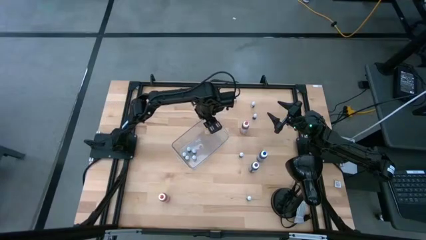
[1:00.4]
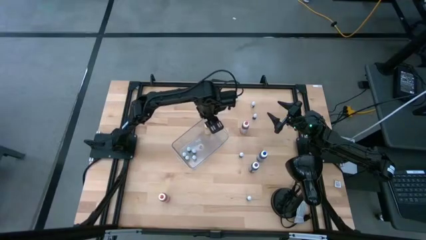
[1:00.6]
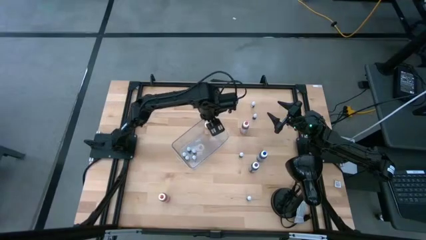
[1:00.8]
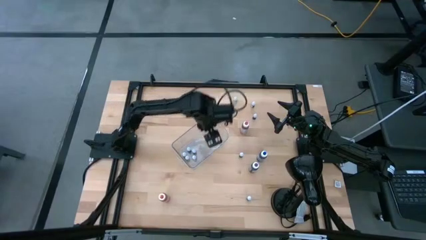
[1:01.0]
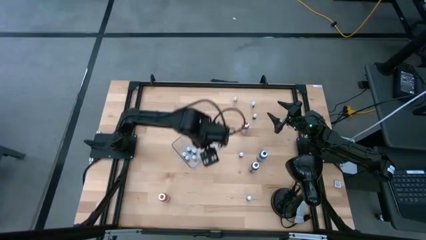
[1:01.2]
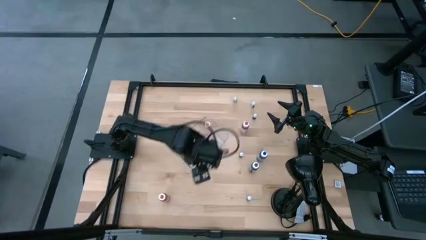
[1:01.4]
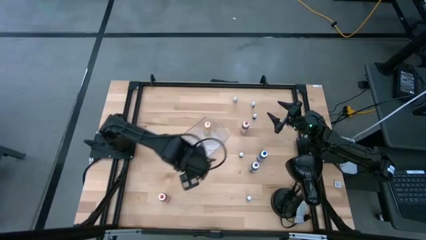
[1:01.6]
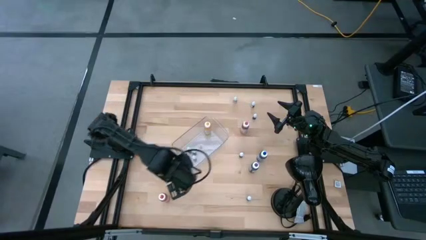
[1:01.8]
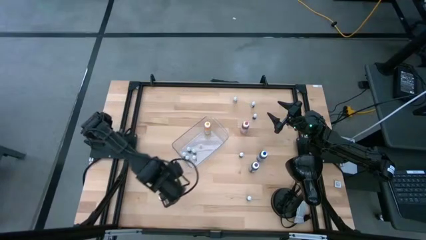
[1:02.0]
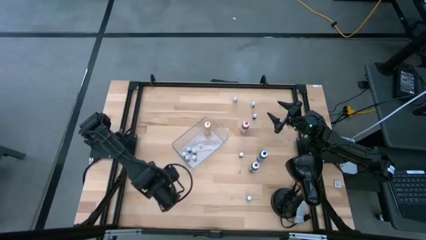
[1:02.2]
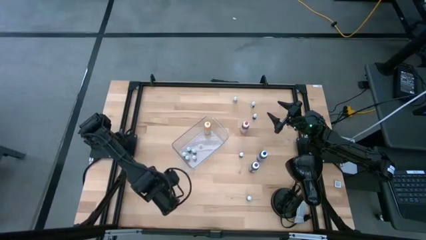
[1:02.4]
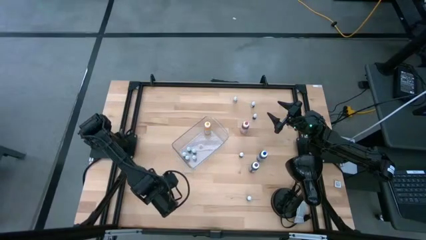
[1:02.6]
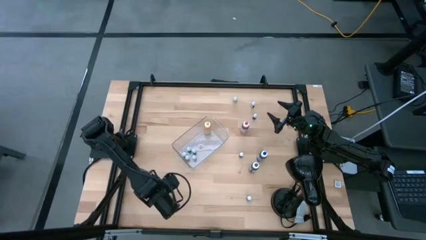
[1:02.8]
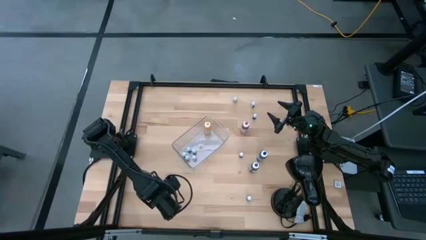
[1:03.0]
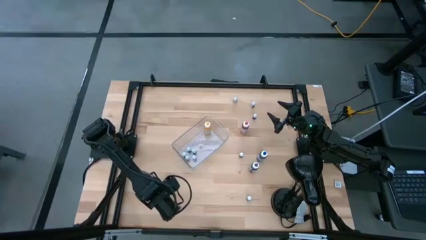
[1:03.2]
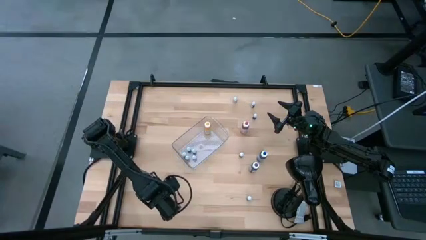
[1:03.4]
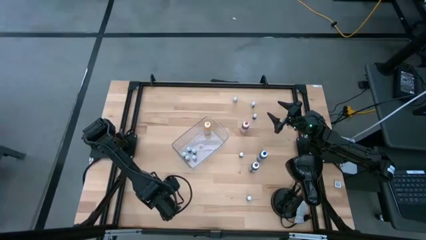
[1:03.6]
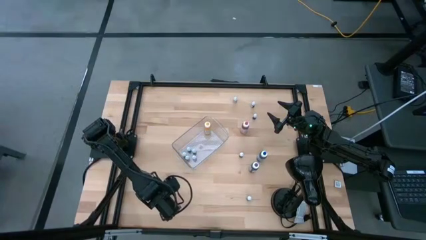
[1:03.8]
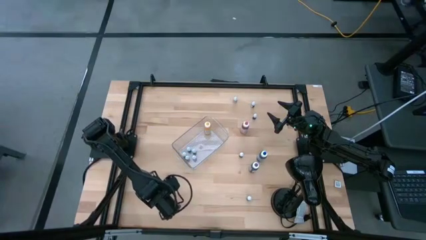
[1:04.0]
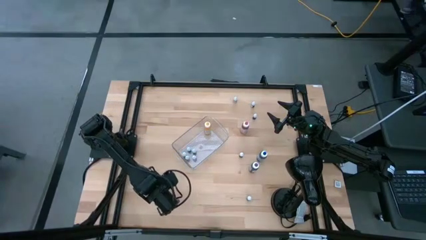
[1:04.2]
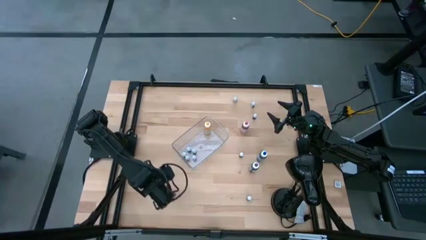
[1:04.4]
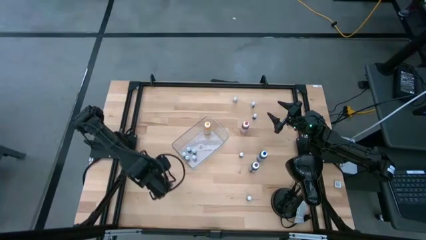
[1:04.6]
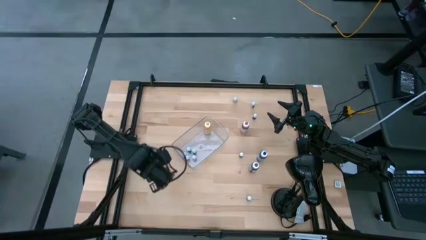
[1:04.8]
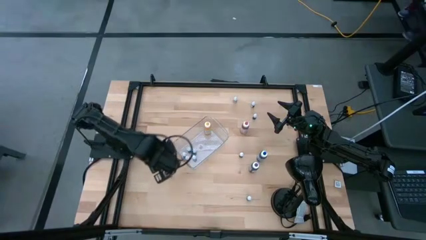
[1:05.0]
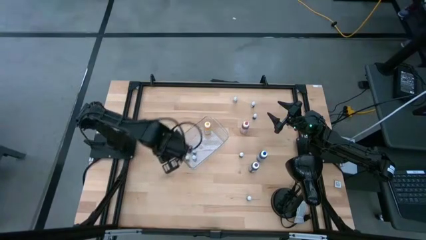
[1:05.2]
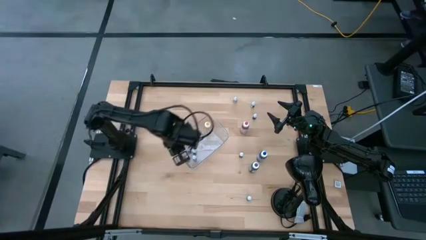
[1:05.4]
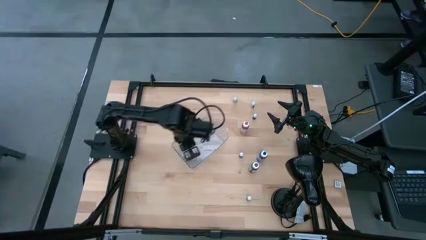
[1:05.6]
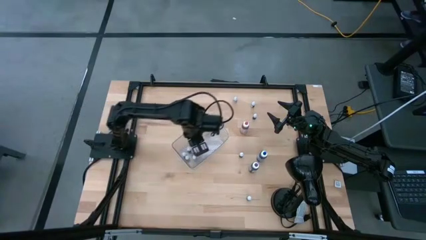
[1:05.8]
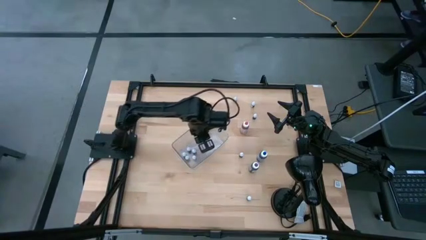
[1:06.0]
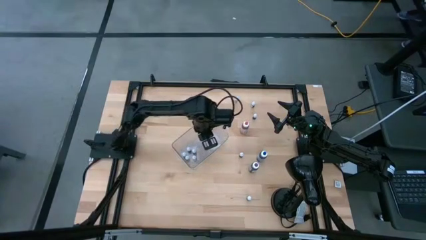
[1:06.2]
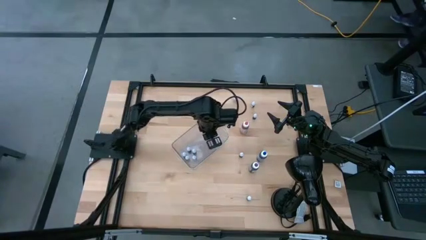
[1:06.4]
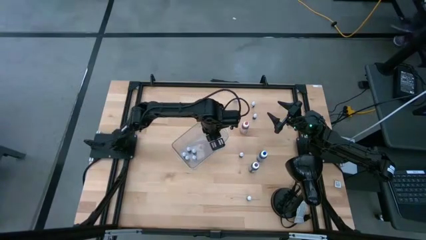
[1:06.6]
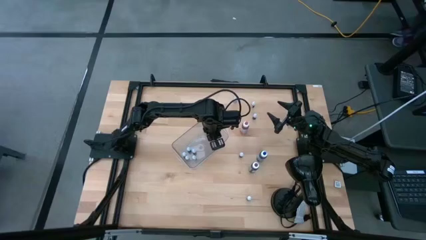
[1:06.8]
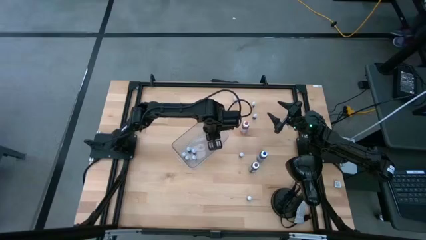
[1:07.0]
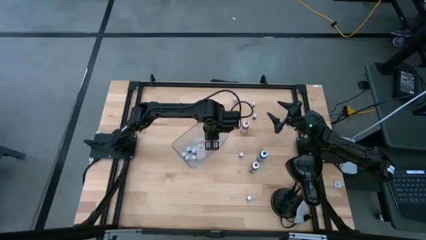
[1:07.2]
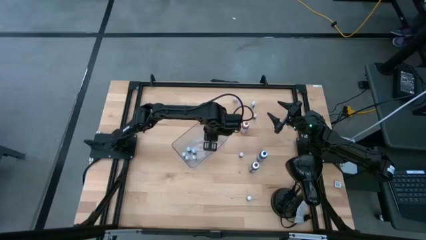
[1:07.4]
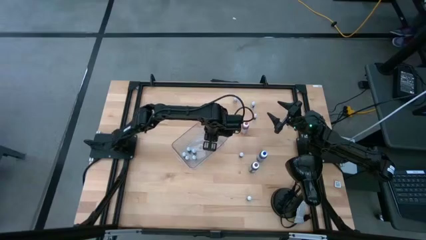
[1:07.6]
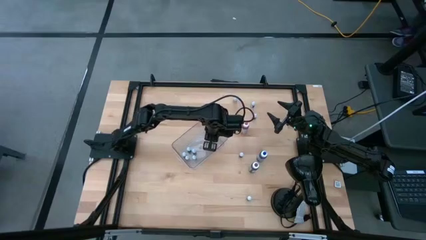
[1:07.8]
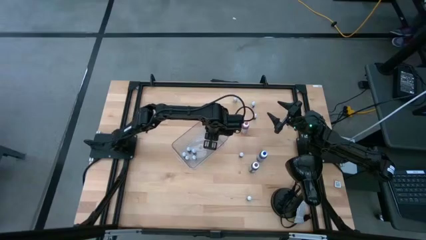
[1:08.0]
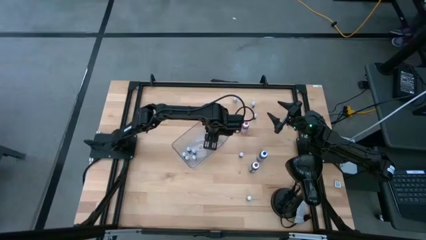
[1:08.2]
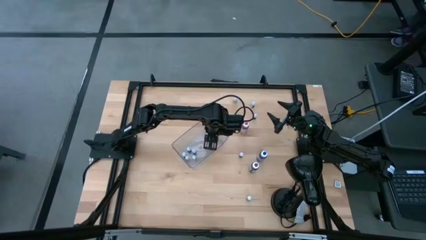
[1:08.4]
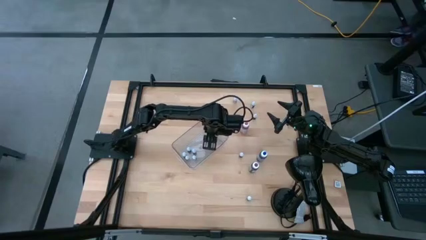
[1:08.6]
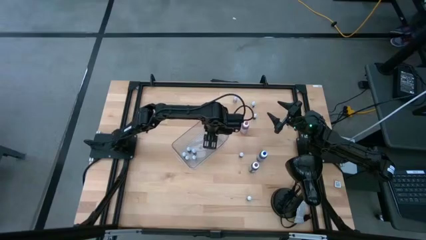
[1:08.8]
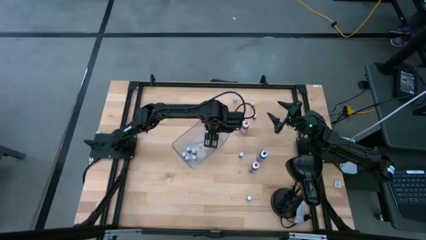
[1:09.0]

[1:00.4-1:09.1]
Task: Pick & Place food coloring
Put the large orange food coloring bottle into the transparent bin

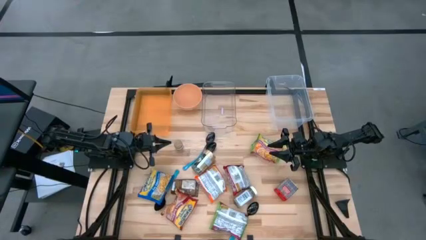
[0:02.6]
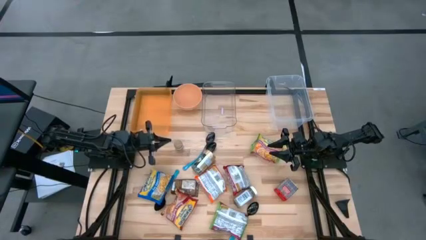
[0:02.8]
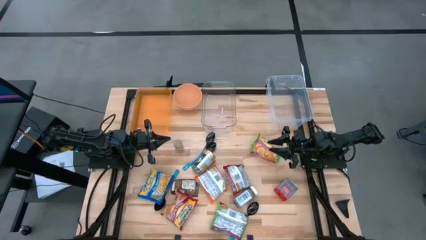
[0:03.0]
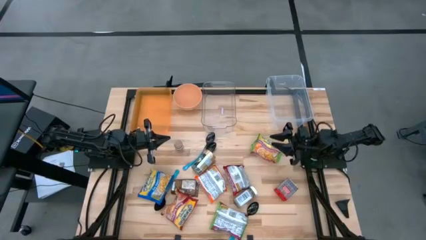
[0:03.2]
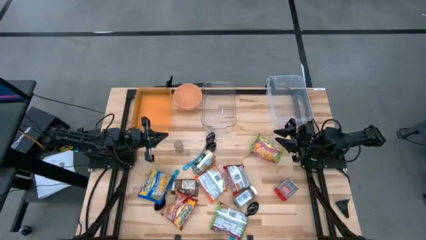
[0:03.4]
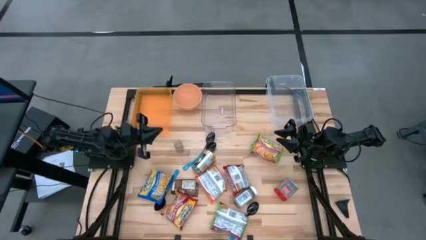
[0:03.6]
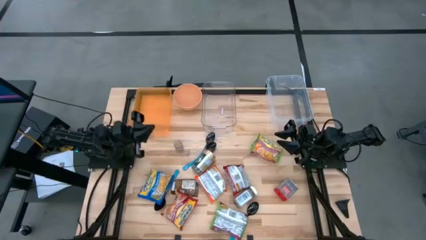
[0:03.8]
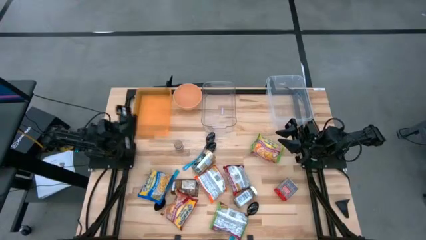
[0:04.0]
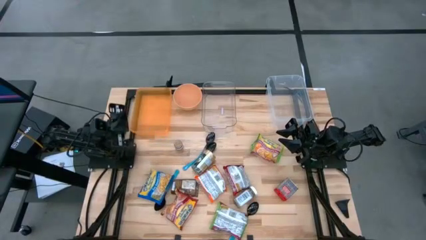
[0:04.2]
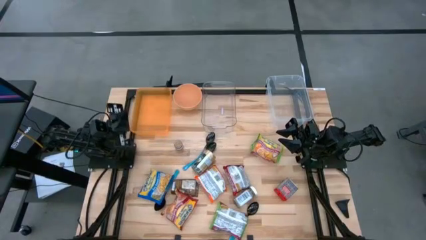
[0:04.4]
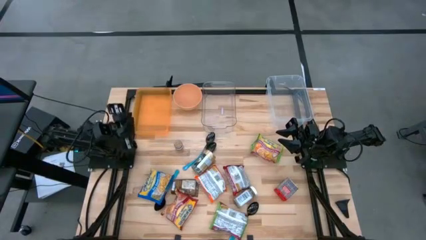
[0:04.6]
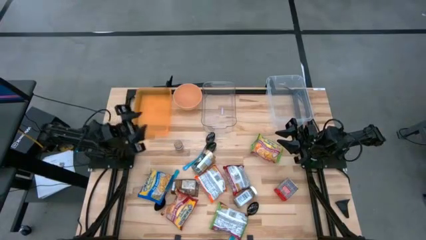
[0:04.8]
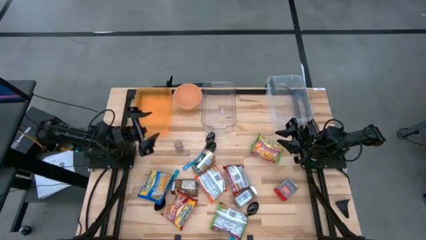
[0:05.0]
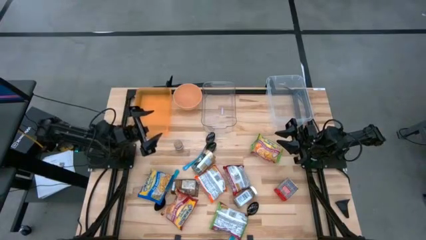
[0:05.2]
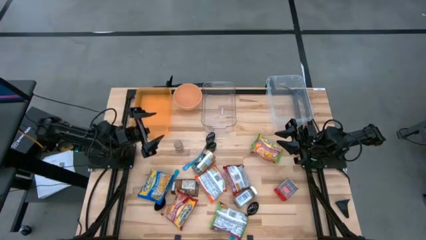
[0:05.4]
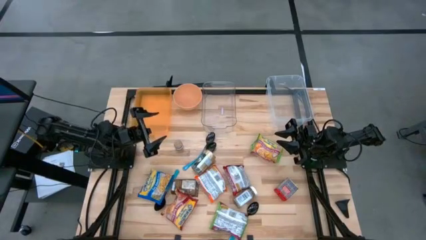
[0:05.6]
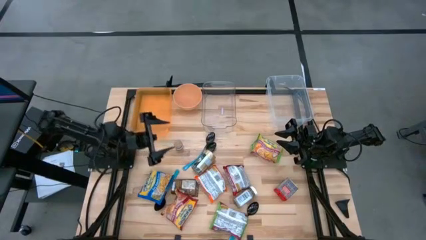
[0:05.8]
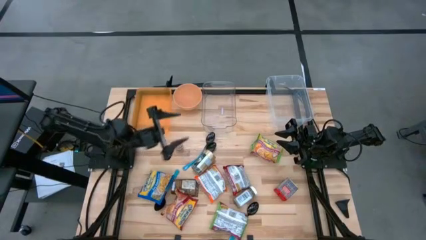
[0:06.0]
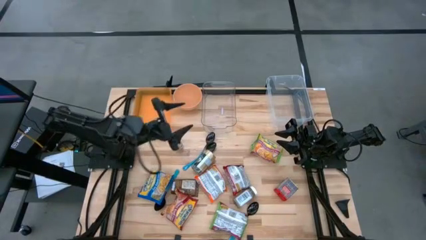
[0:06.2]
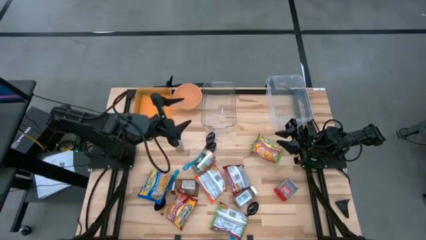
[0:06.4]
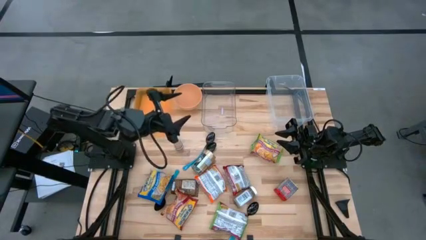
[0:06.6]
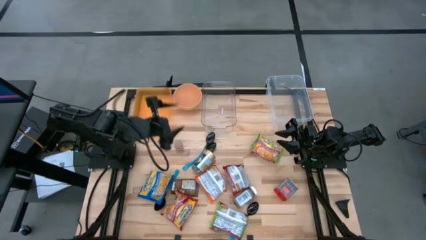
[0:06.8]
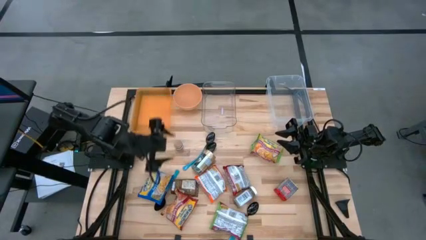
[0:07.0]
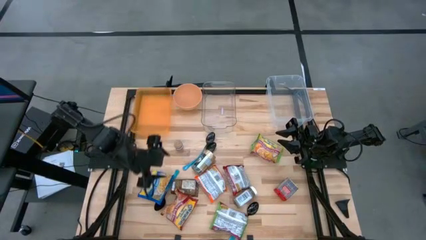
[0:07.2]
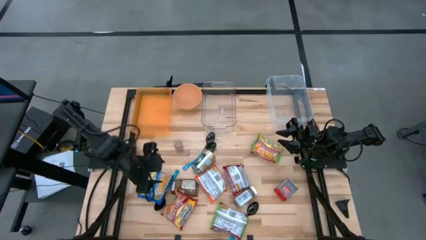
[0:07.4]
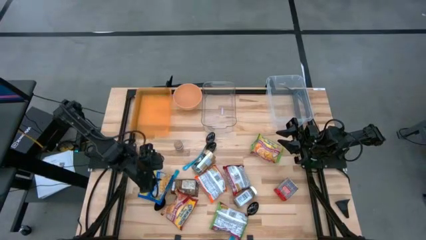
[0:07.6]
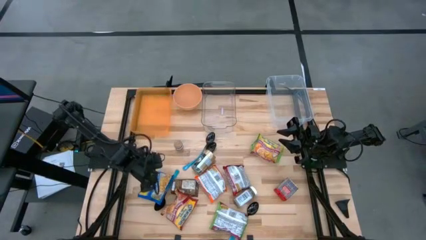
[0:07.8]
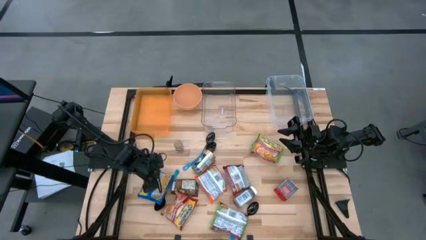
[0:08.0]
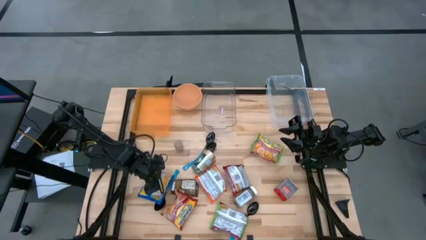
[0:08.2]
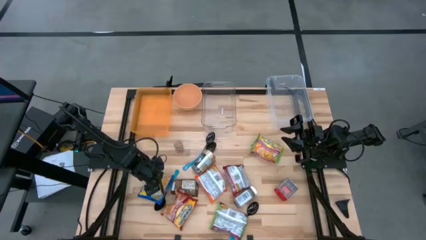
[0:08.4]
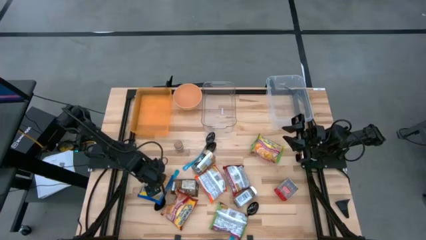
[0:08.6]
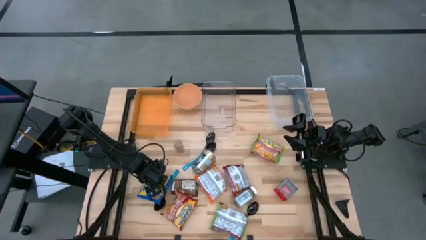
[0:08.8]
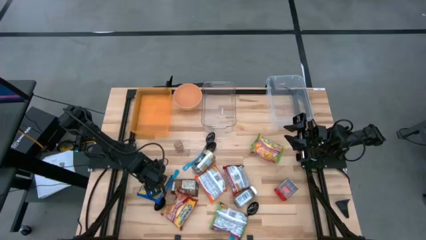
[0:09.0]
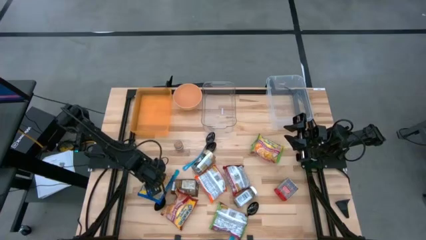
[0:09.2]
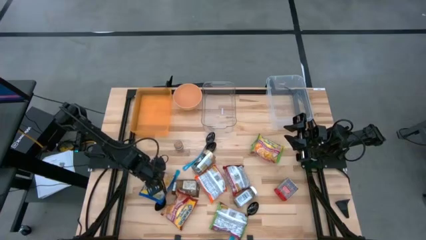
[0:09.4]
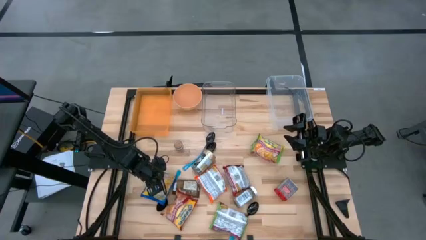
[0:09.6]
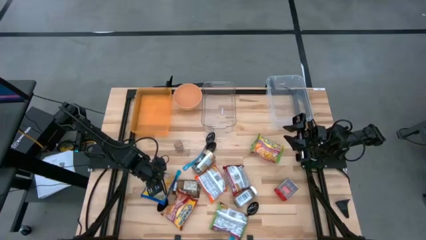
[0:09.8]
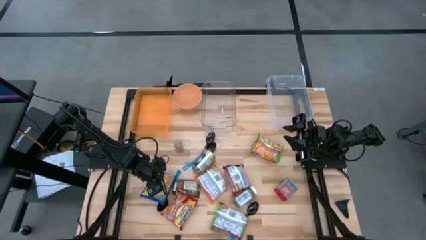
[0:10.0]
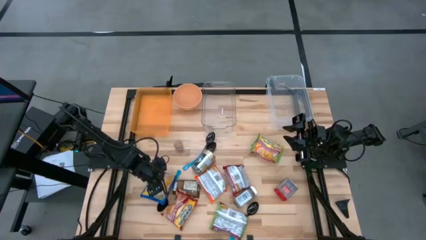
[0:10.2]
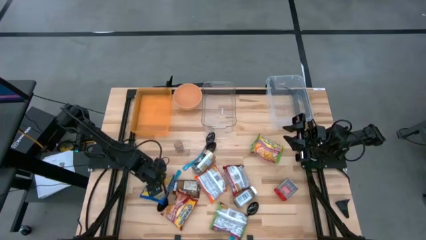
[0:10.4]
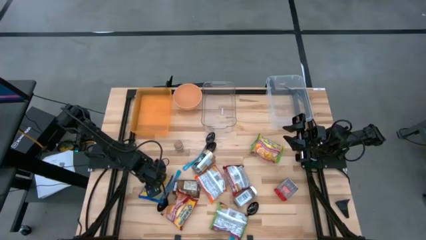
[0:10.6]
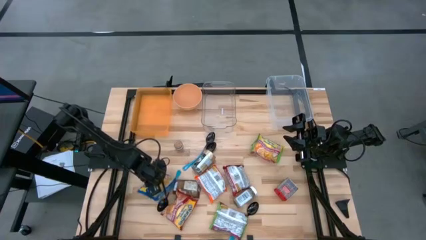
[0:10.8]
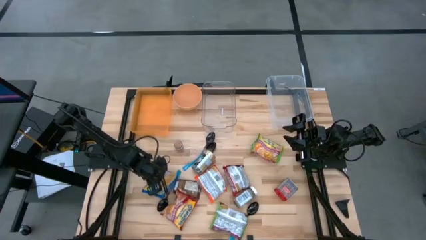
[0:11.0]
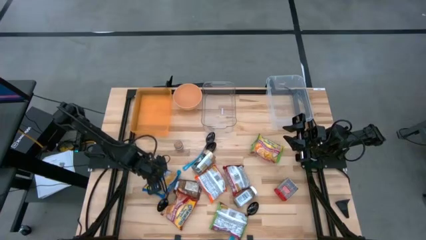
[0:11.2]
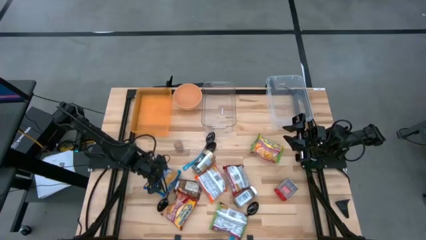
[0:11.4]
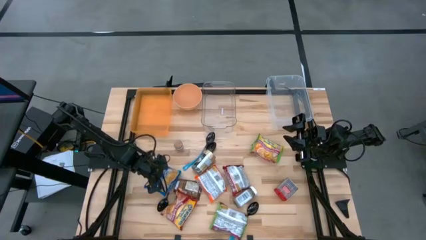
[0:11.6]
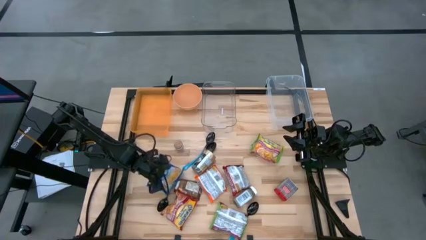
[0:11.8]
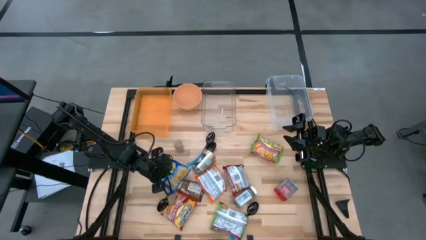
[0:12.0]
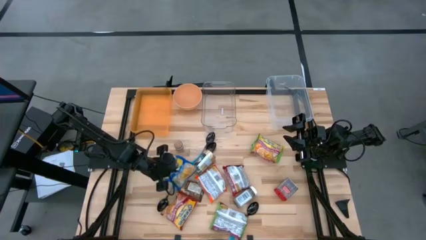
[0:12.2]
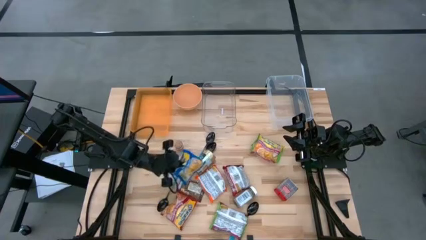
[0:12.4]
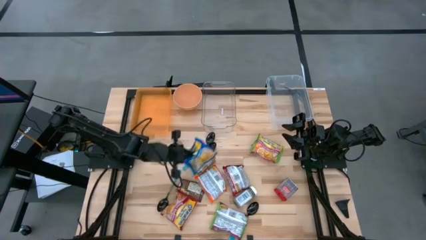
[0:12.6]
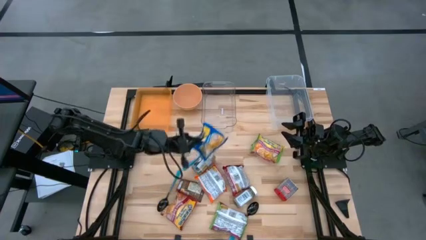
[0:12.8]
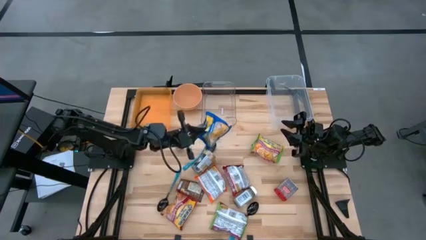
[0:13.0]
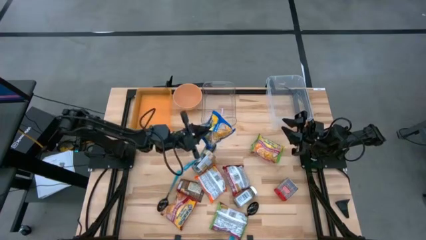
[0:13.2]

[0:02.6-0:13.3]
Task: Pick & Place Food Item
Put the blue noodle pack into the transparent container
